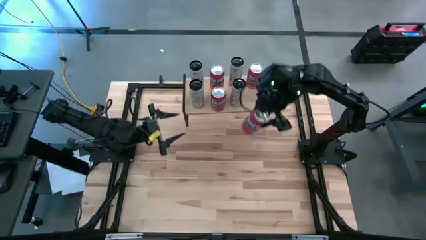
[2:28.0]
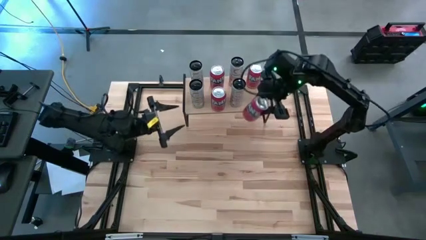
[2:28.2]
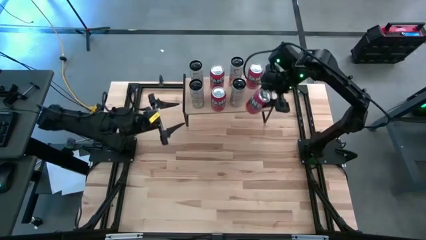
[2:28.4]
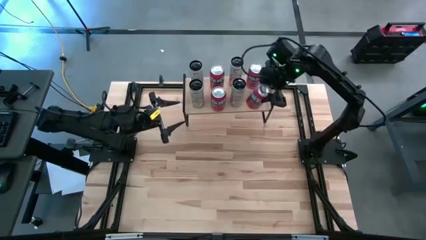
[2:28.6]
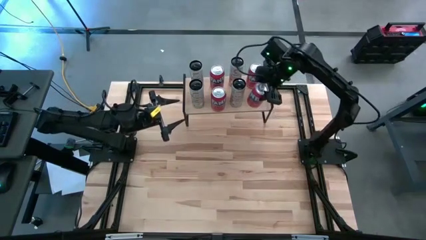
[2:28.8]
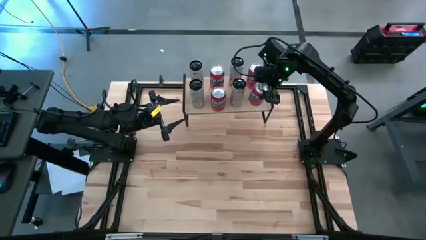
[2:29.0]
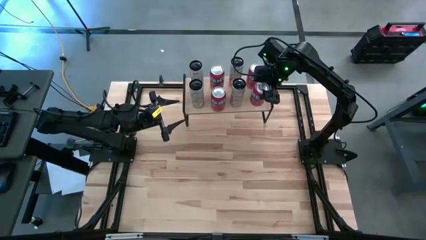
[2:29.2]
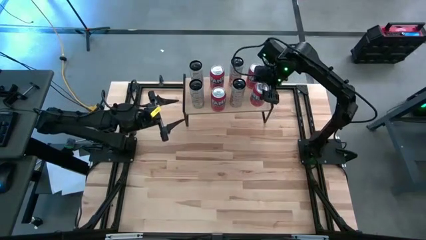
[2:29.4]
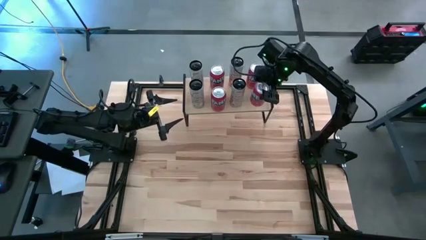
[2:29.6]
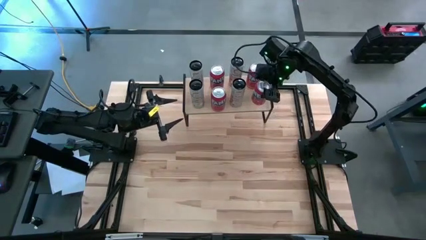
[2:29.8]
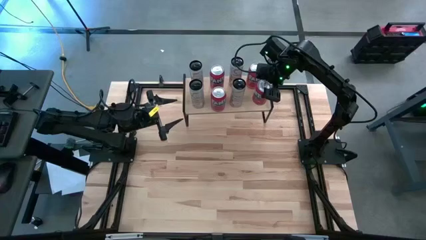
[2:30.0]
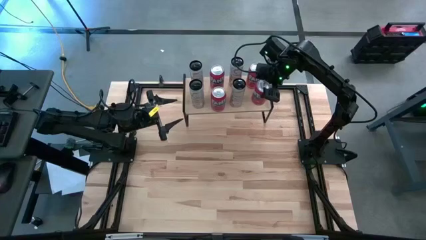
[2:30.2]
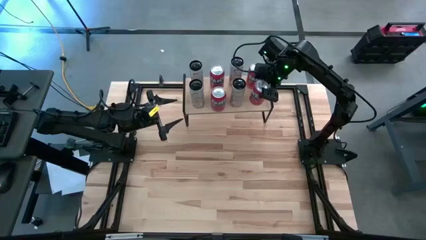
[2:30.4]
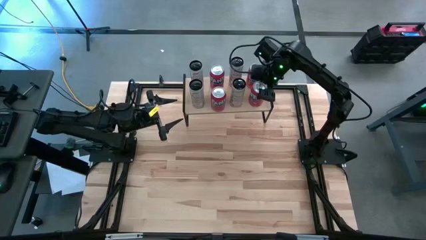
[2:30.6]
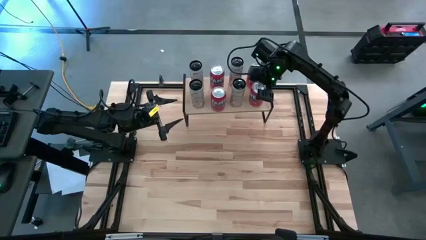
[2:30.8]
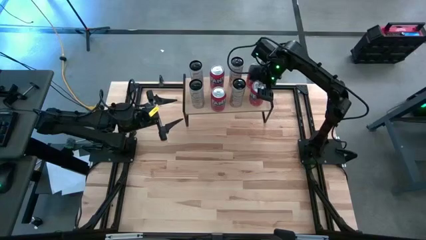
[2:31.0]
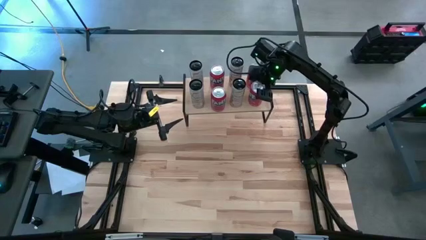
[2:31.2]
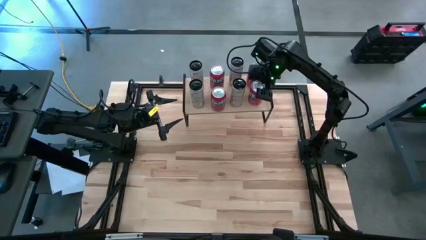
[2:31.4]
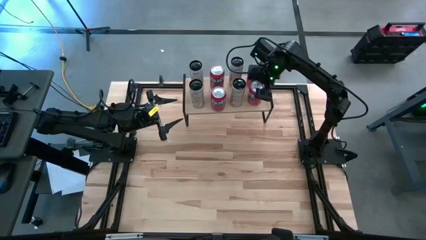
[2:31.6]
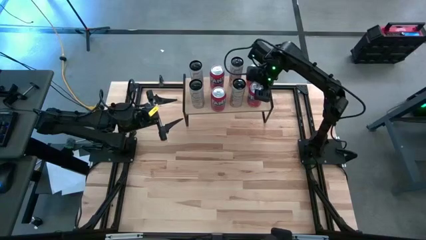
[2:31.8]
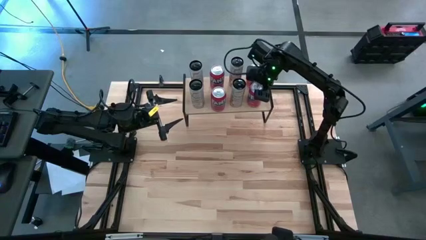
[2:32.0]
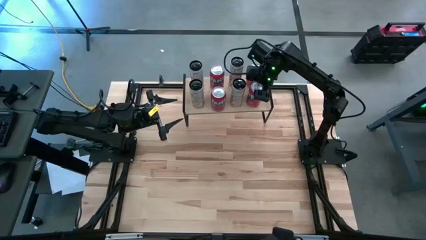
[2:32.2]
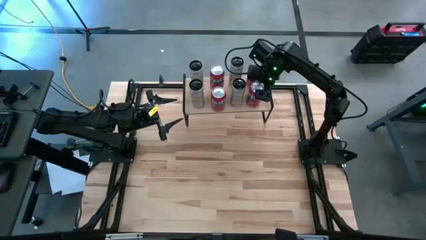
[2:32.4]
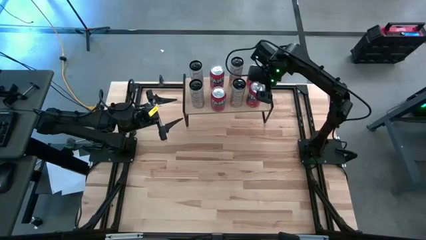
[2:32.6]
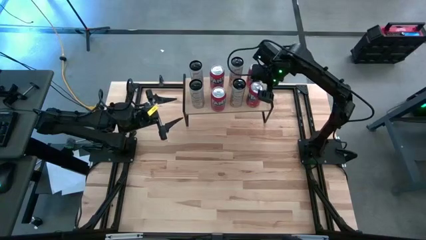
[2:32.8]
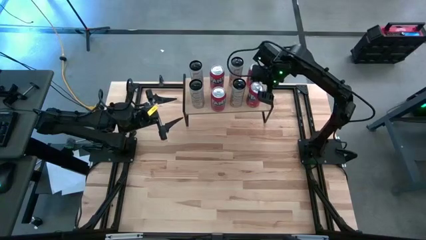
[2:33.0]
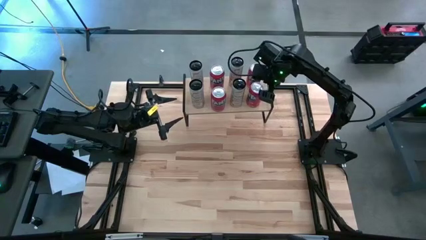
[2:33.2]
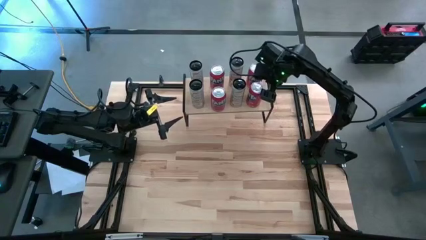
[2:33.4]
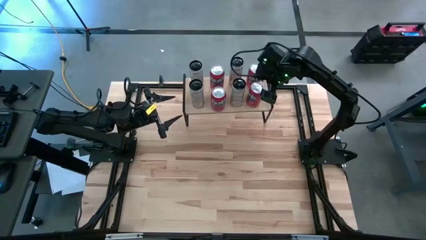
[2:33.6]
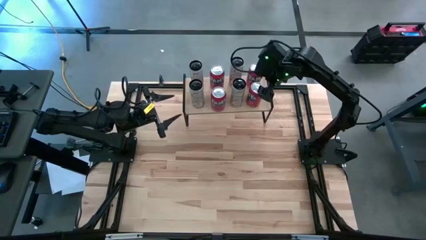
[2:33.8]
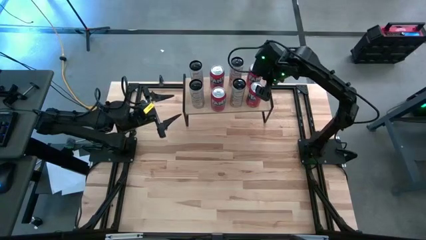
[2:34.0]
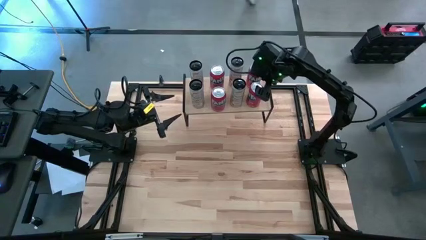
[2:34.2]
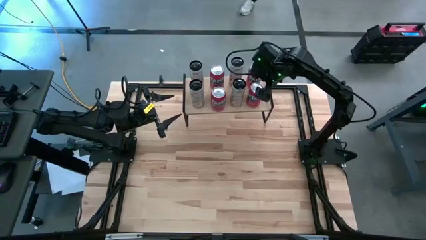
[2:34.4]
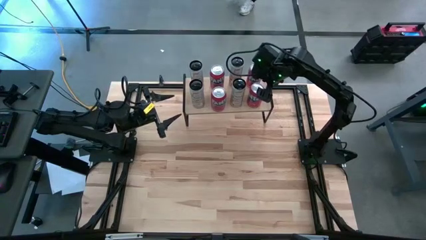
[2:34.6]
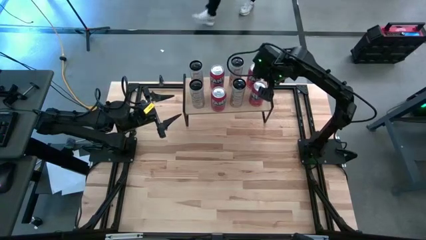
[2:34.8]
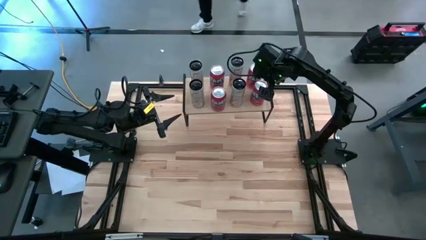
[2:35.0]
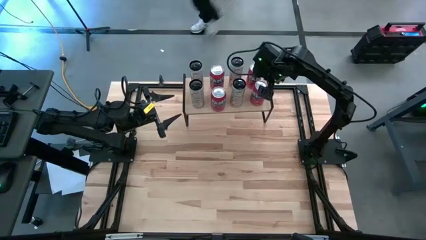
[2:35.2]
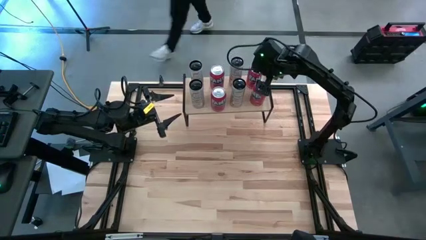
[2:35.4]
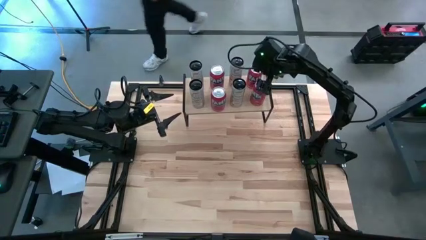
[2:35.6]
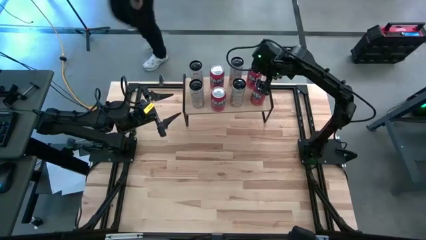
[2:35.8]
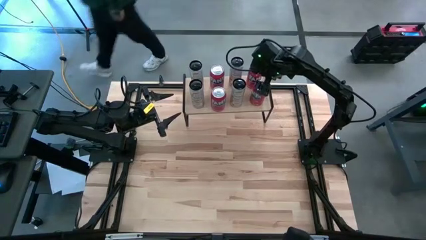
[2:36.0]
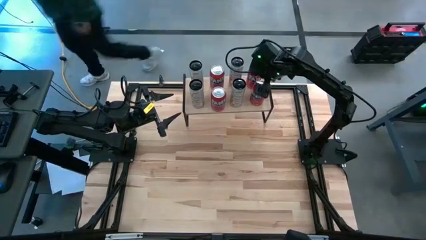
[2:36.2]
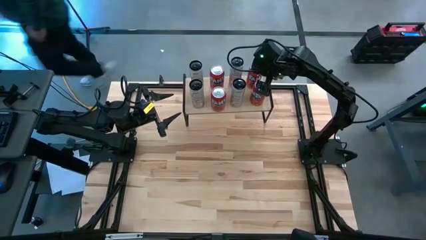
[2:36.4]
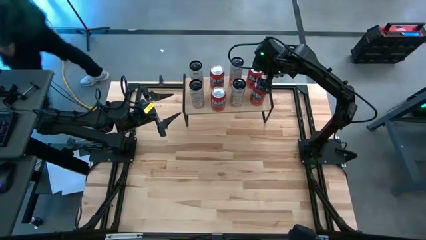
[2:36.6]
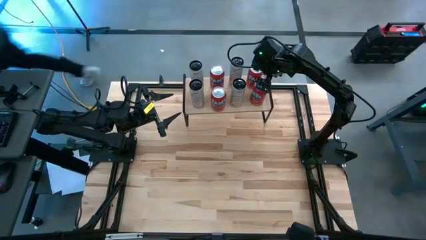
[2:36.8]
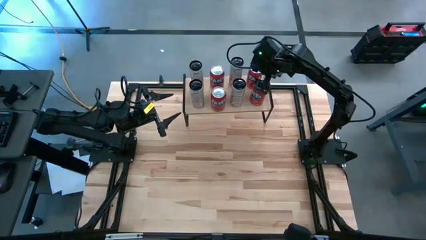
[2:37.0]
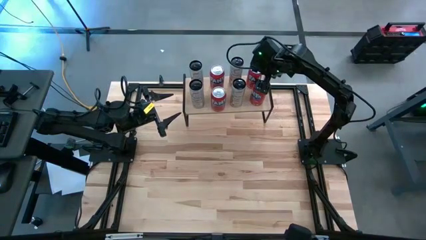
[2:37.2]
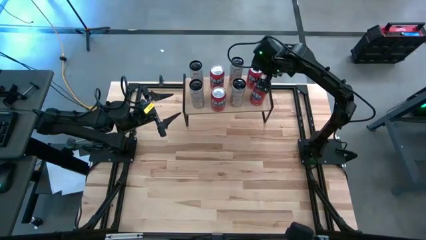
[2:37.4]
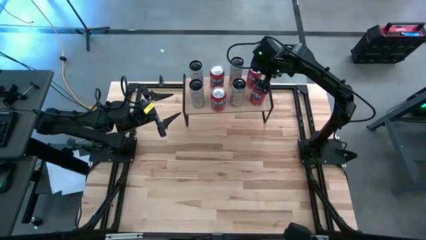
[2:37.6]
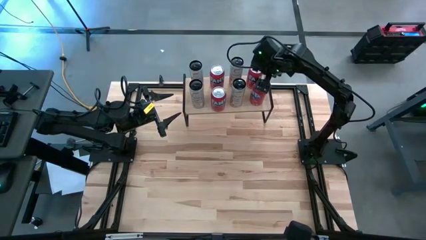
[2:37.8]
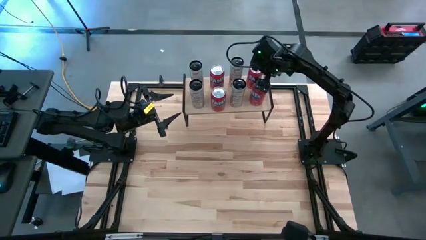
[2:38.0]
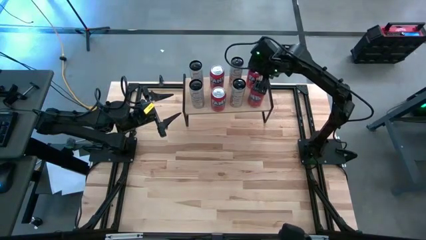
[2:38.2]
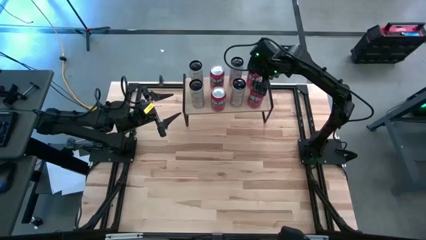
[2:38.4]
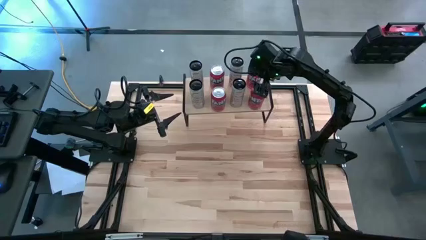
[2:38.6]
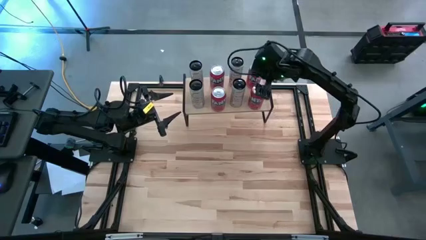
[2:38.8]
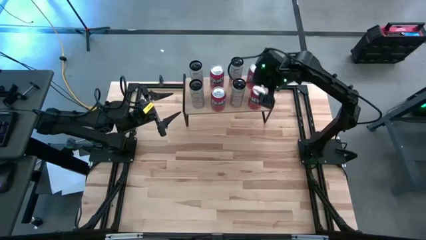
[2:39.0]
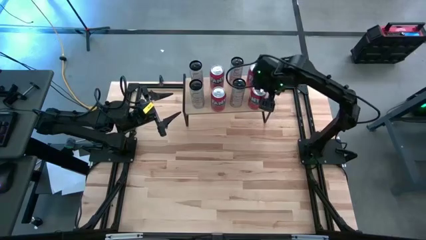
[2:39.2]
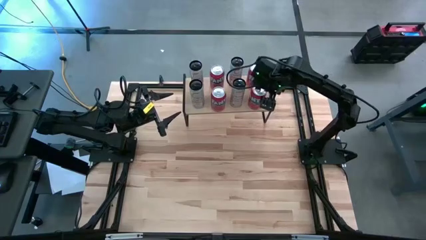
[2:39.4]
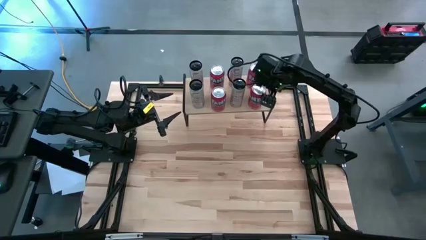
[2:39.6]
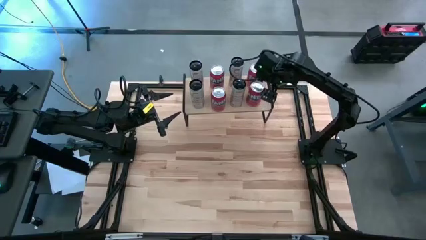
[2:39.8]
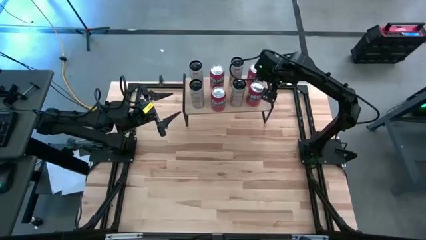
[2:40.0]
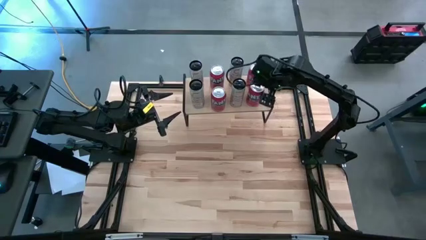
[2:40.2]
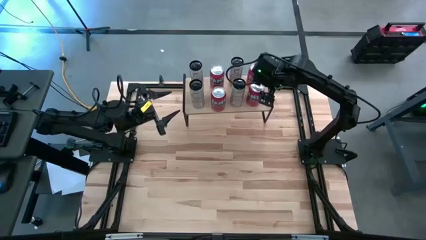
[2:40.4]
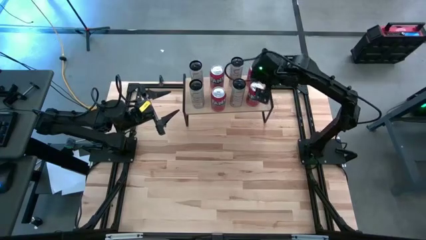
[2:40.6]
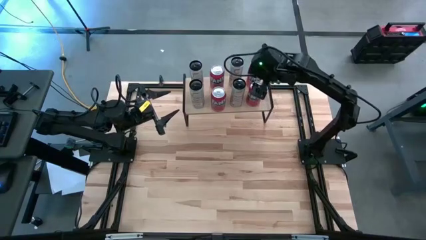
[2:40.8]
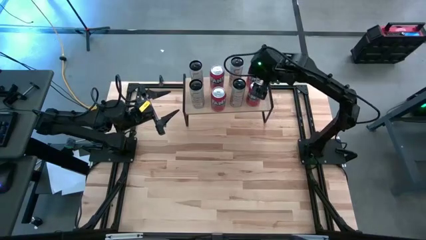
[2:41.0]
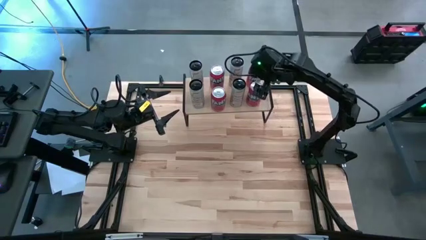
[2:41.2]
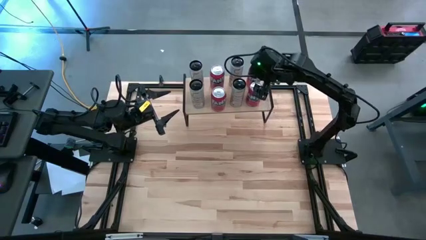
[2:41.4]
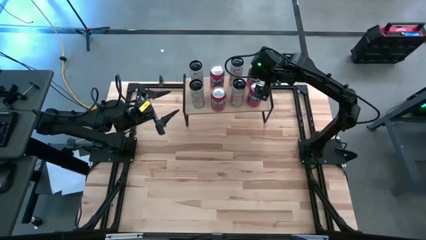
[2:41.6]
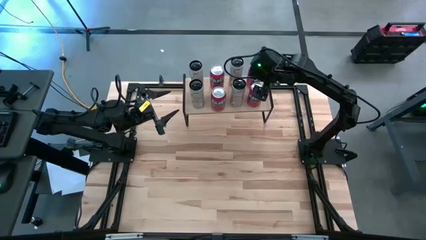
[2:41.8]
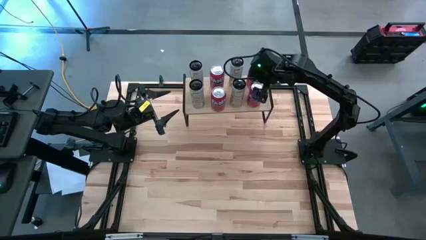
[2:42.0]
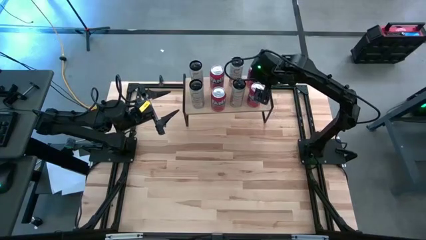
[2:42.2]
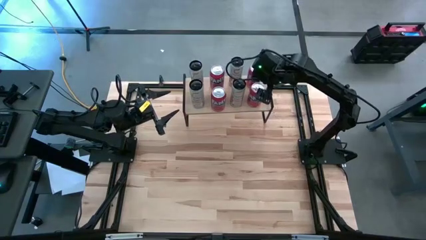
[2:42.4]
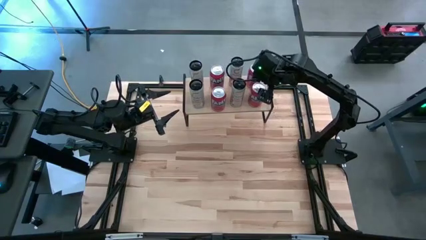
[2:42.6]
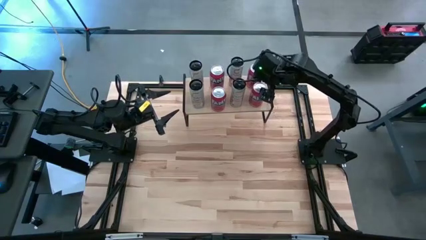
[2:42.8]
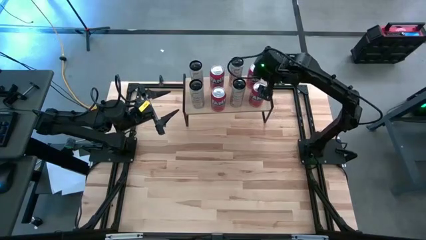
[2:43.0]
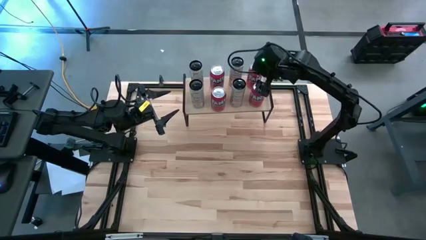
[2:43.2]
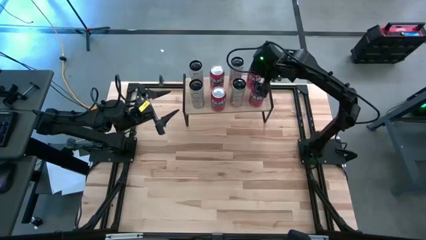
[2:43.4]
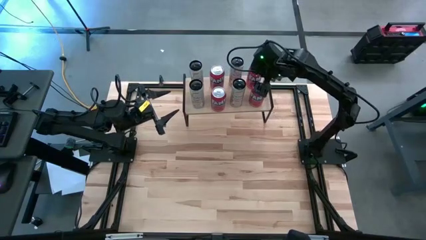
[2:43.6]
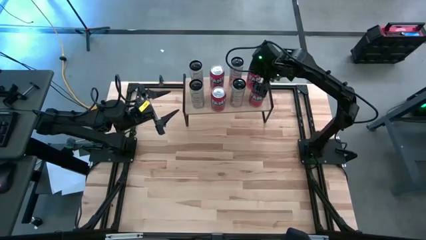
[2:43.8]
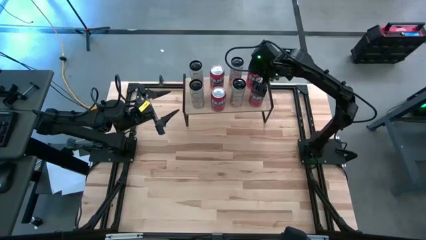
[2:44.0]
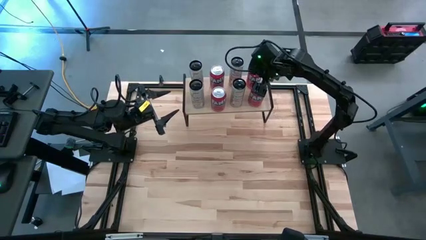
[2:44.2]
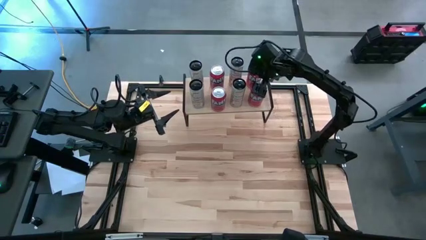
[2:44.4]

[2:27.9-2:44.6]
Task: Place canned beverage on shelf
Put the red soda can on the shelf aligned with the other red soda can
